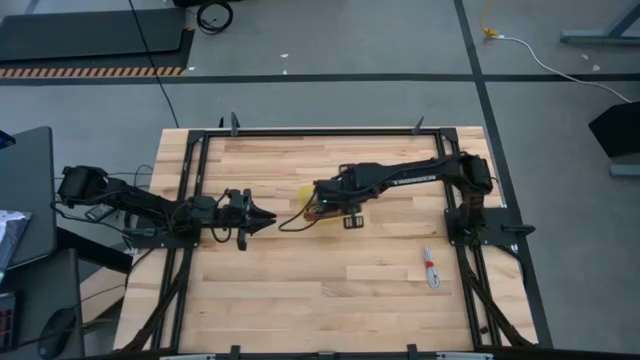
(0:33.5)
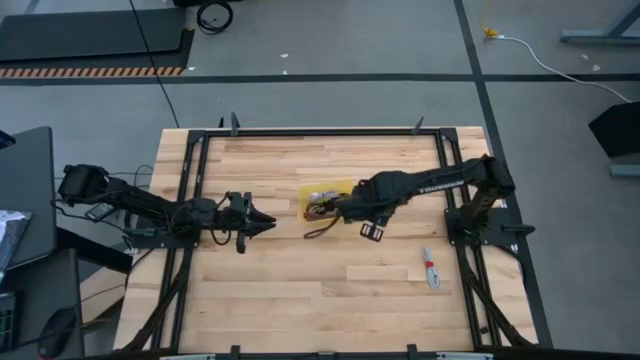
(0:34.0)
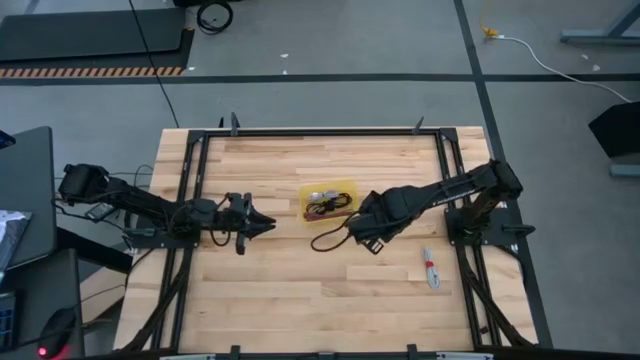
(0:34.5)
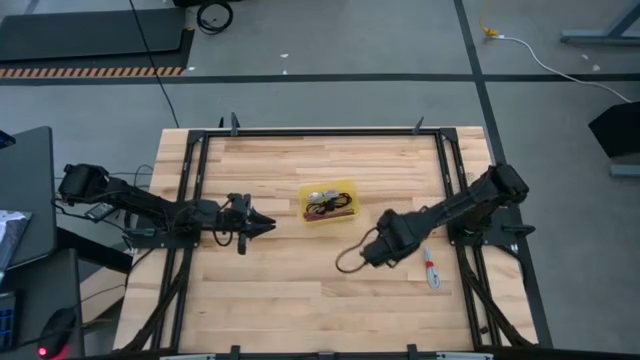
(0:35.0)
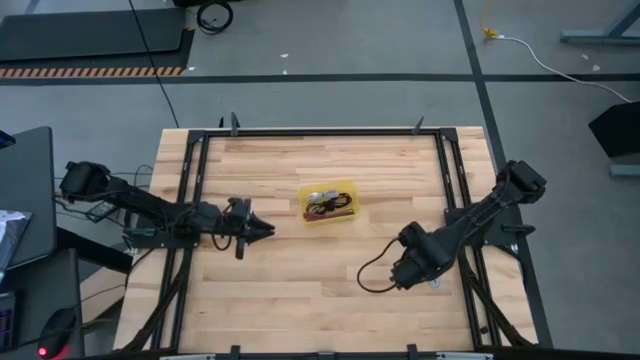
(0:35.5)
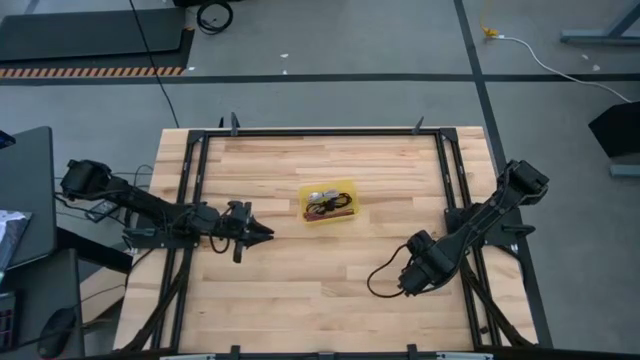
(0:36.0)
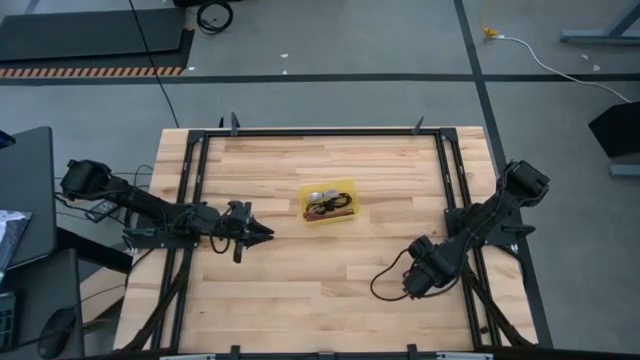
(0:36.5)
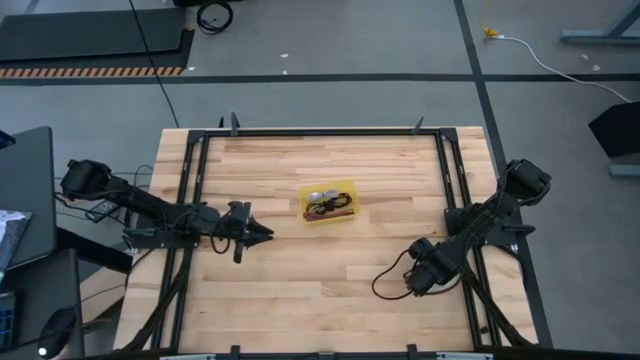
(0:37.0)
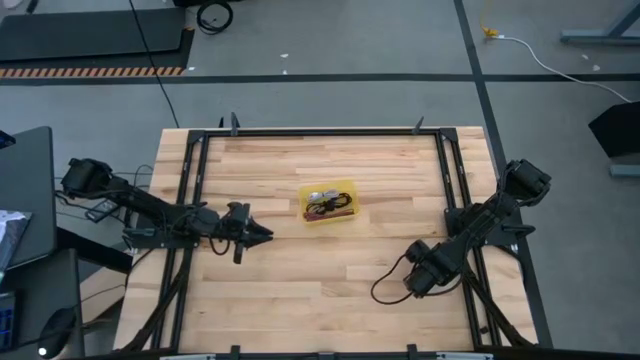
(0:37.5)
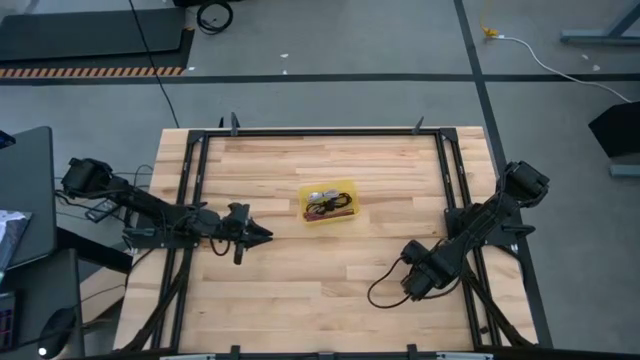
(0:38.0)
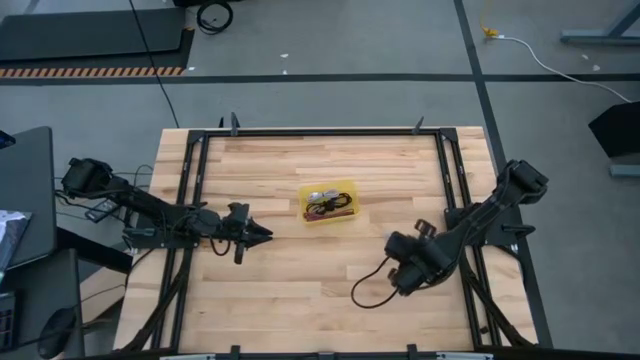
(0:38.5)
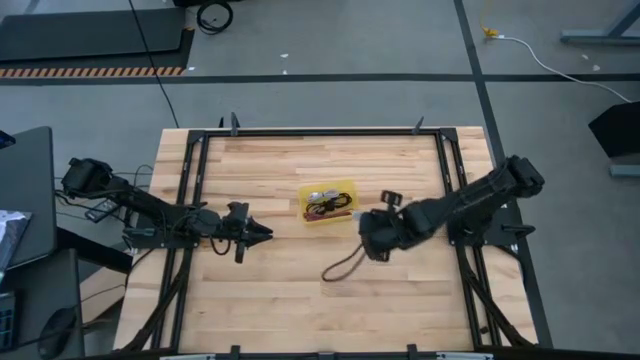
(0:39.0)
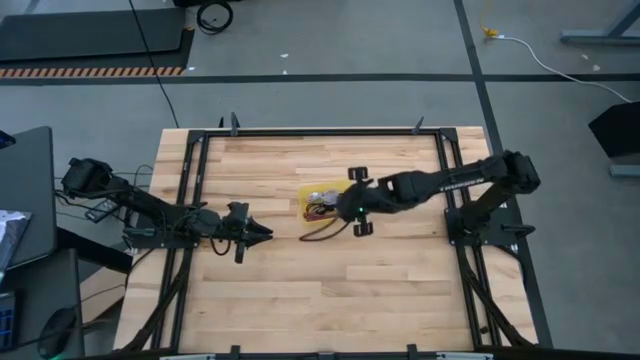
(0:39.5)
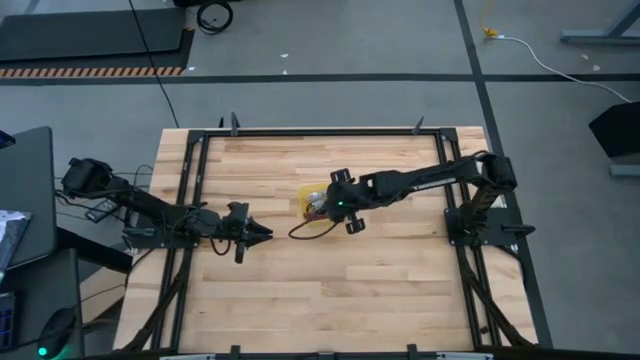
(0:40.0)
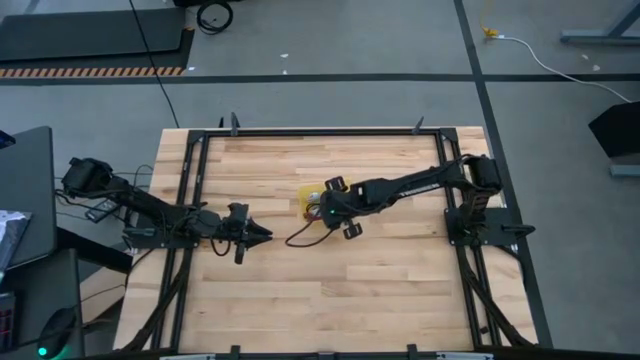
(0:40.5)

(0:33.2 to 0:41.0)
Task: Pick and place USB-C Cables
Put the white cable charger into the yellow bin

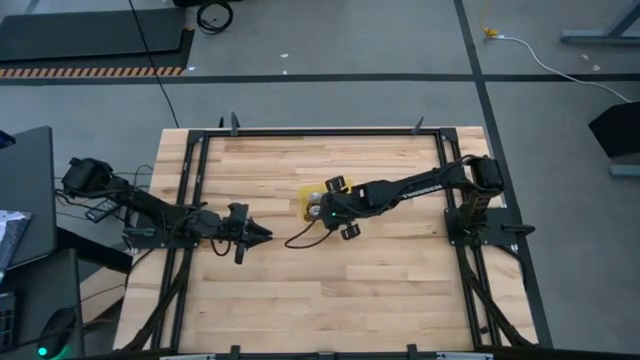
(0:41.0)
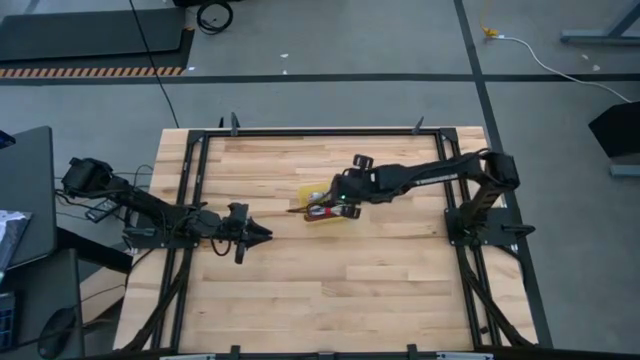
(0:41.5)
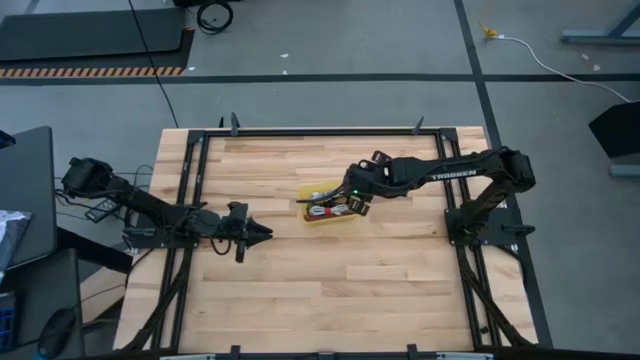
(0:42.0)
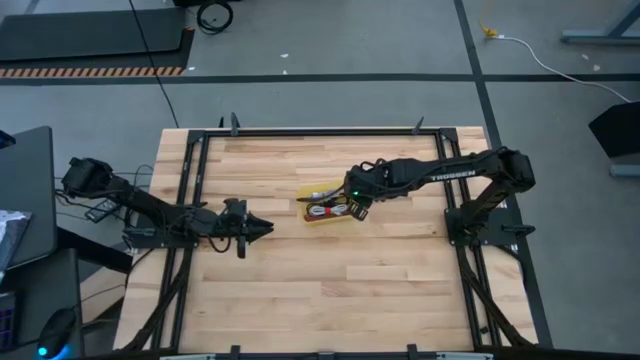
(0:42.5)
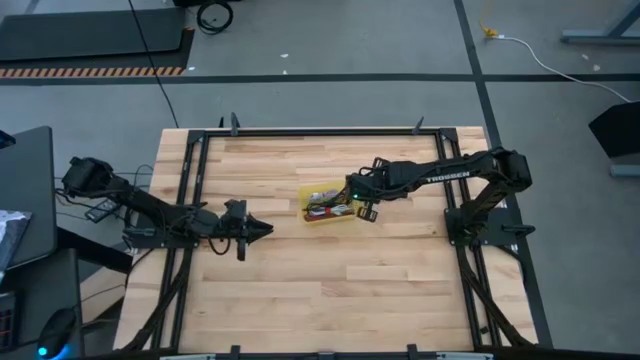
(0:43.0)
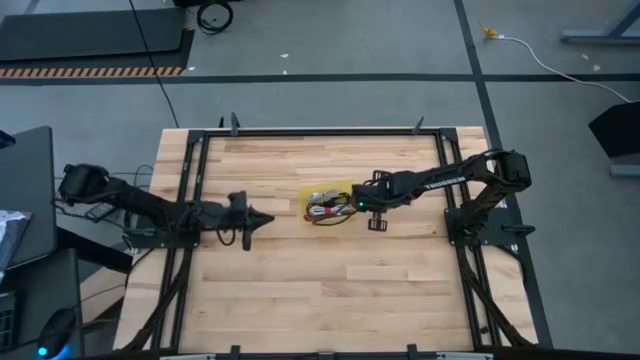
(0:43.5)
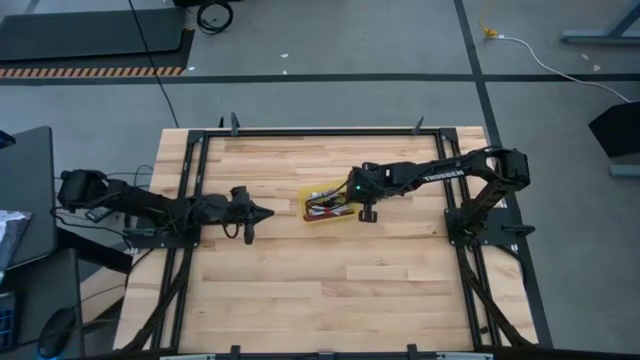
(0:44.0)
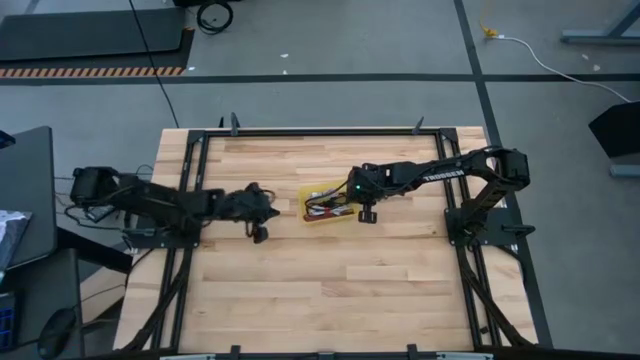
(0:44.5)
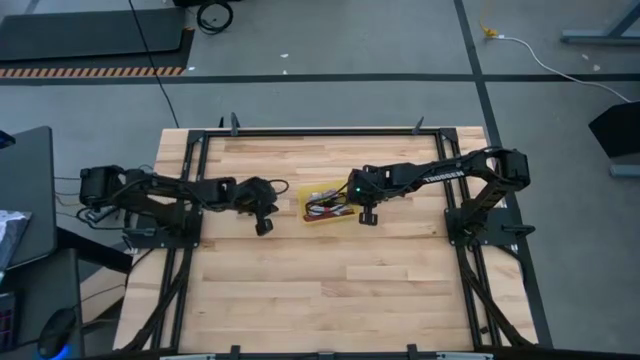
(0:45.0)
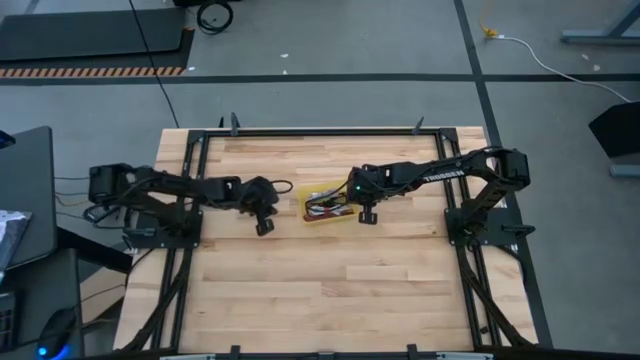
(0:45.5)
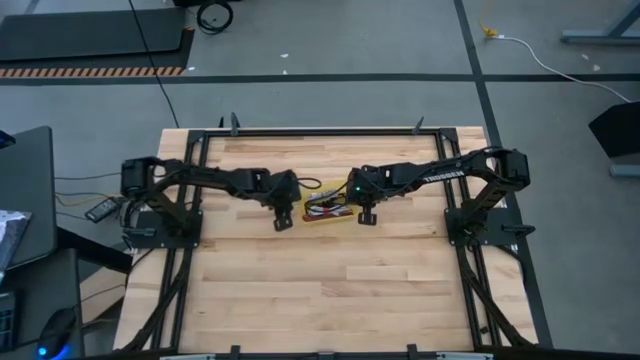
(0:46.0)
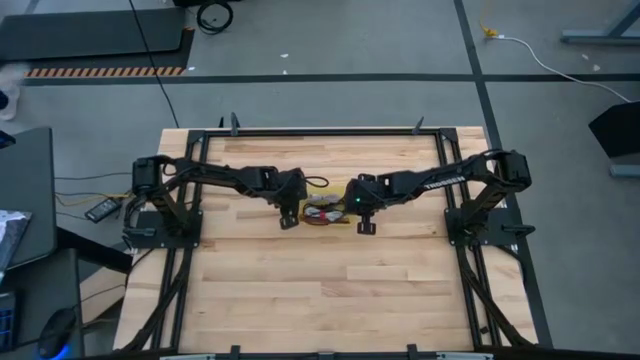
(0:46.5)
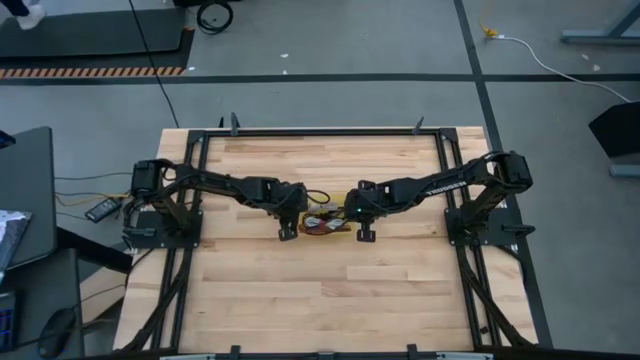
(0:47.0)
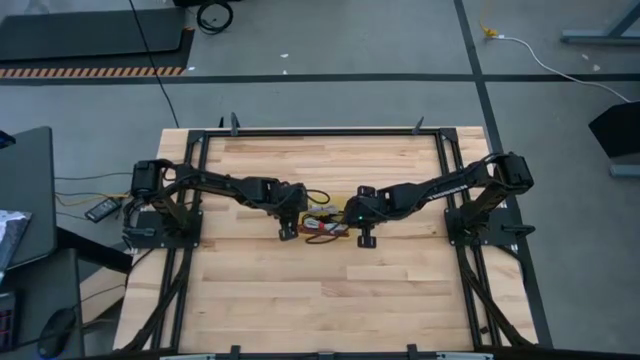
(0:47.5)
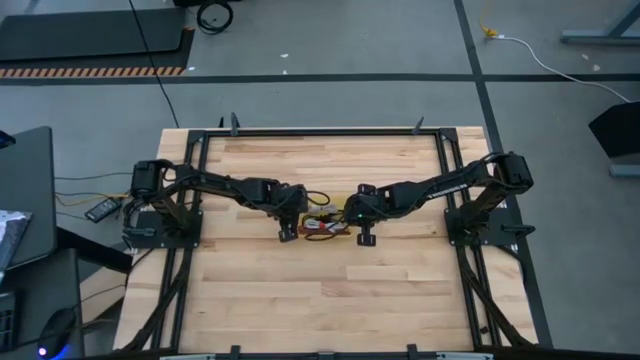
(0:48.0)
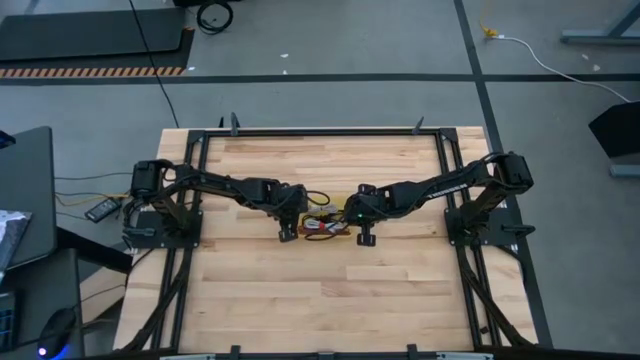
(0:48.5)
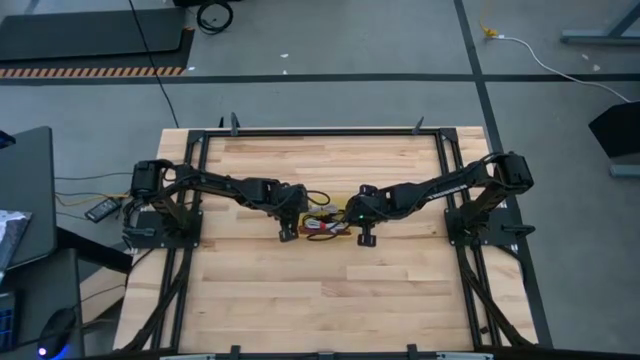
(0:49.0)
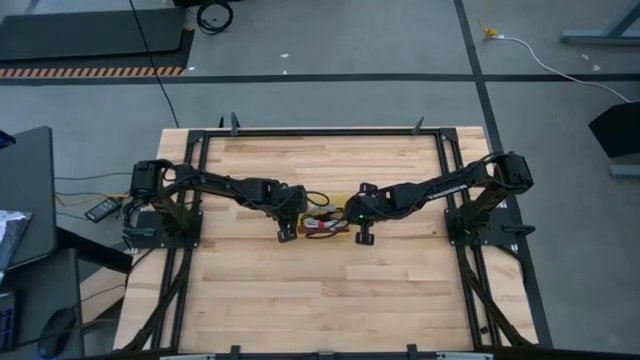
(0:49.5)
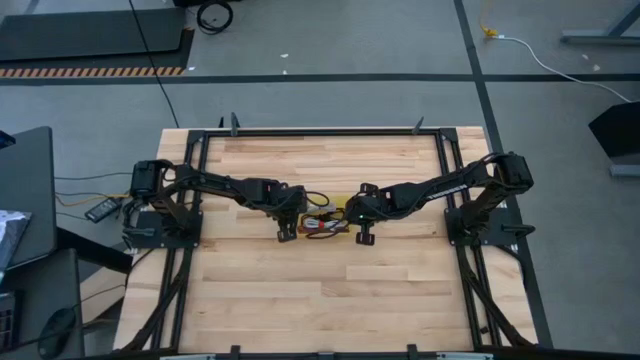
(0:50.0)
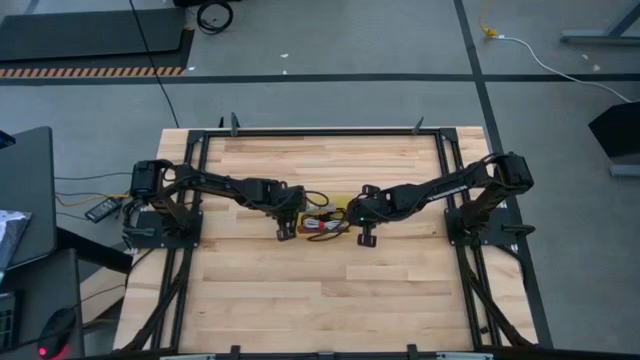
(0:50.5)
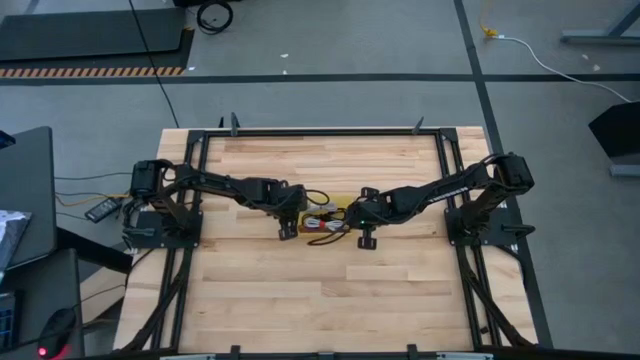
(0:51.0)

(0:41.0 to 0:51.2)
Adjust the yellow bin on the table

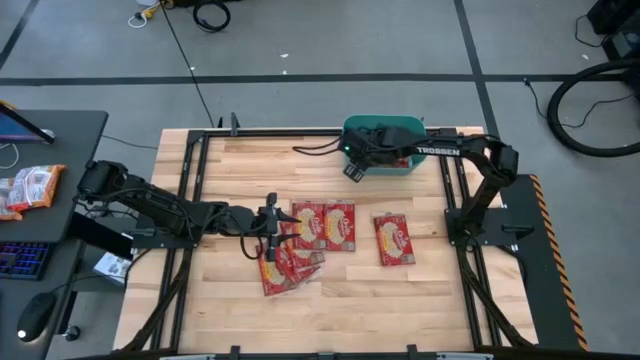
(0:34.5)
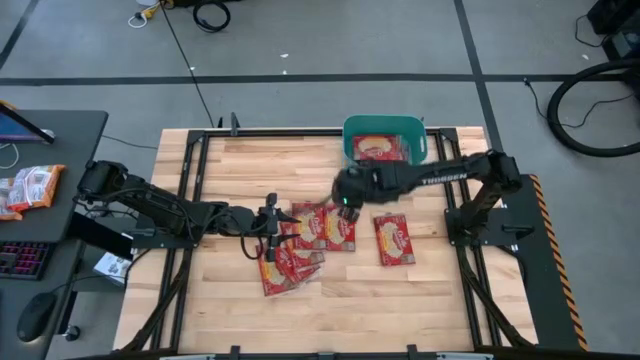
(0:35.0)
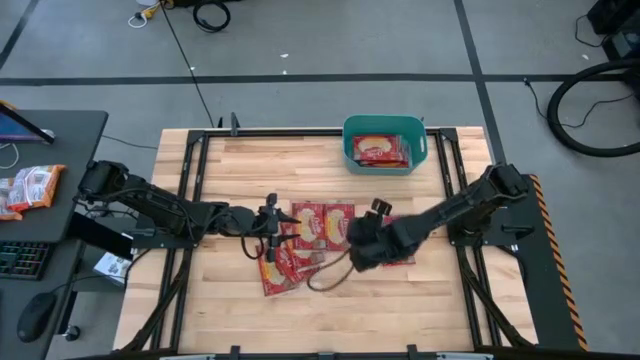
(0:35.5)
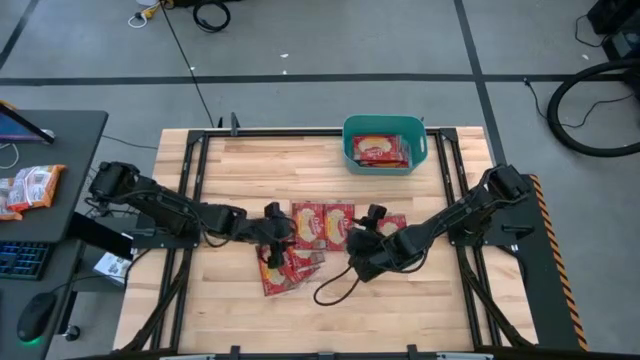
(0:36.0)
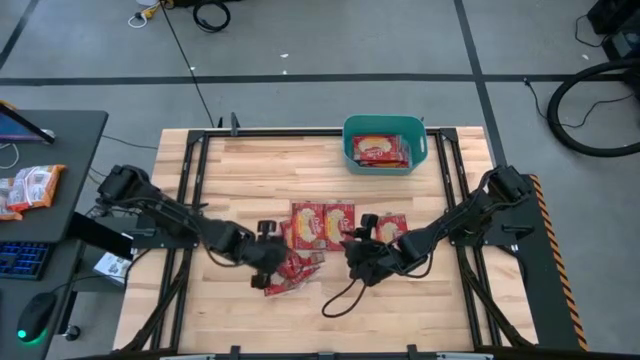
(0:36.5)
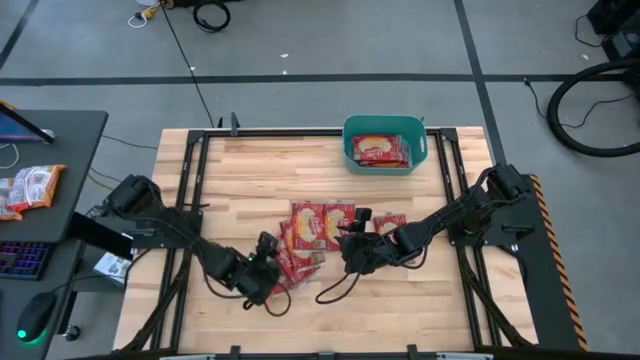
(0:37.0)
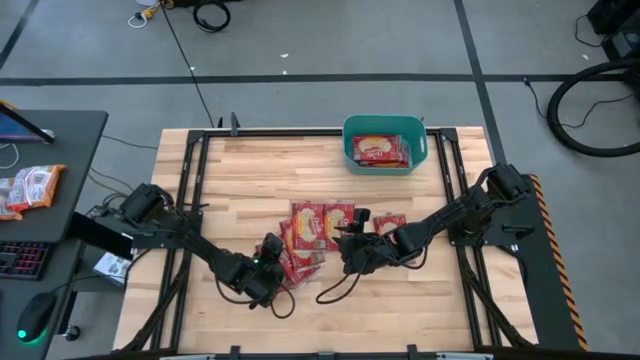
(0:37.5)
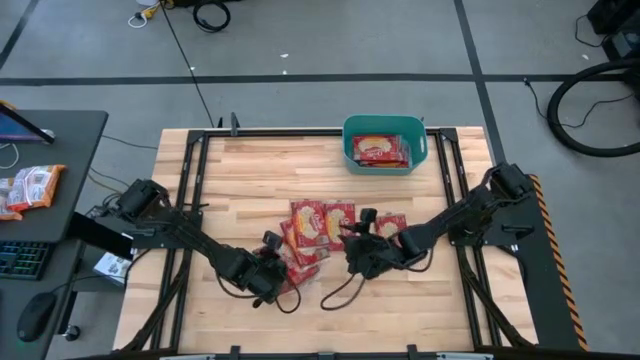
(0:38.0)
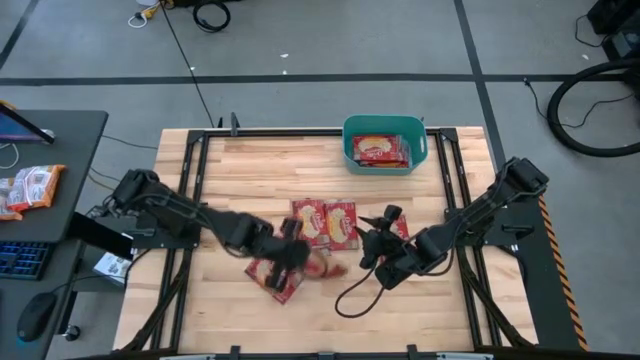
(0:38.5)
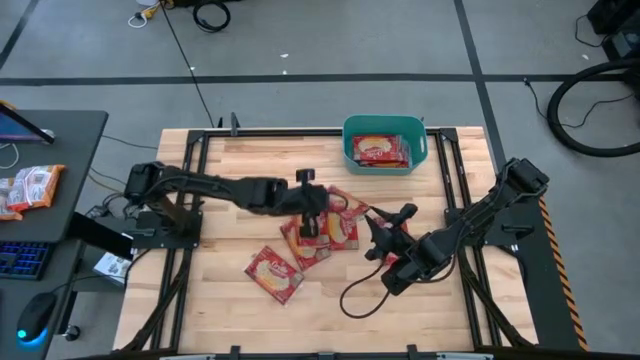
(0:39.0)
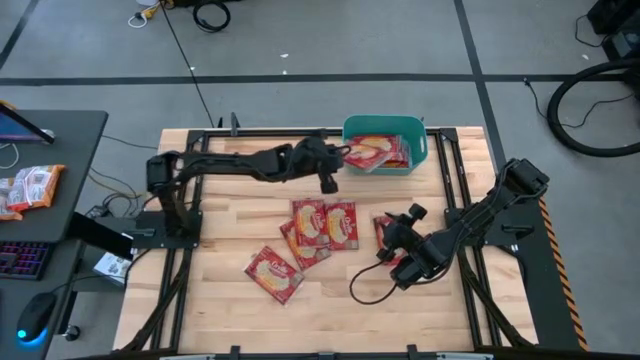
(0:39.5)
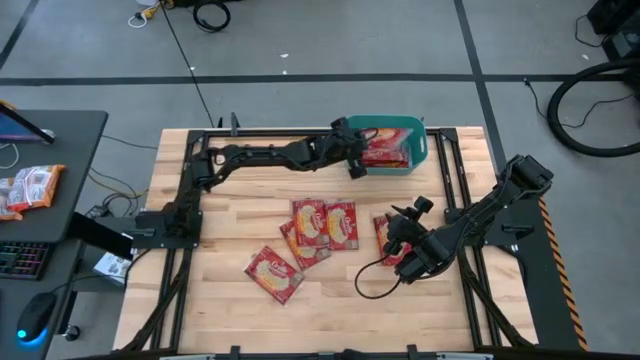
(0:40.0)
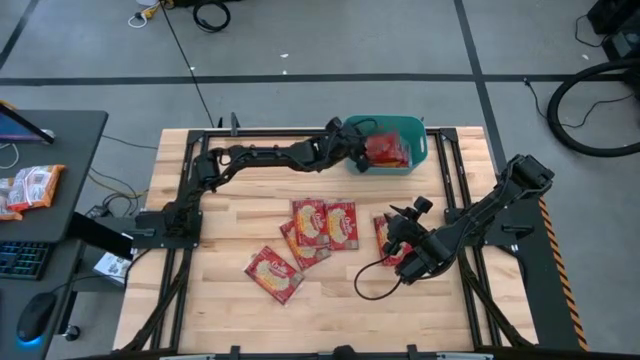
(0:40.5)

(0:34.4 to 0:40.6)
Task: Sort popcorn bags into baskets
Put the popcorn bag into the green bin
